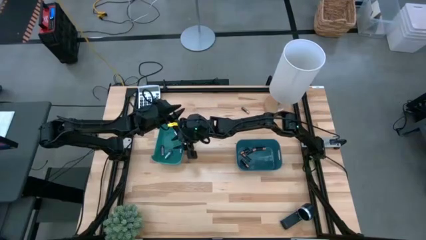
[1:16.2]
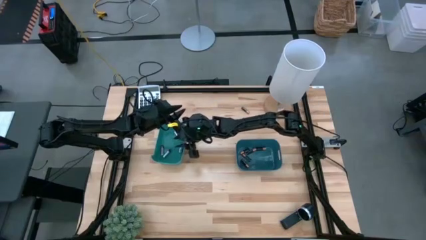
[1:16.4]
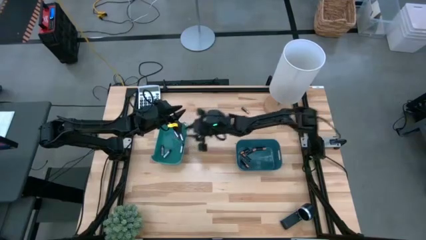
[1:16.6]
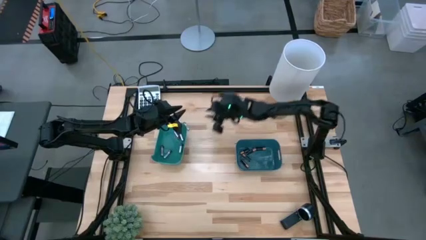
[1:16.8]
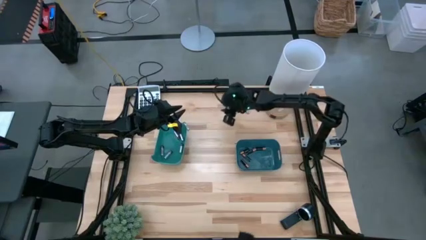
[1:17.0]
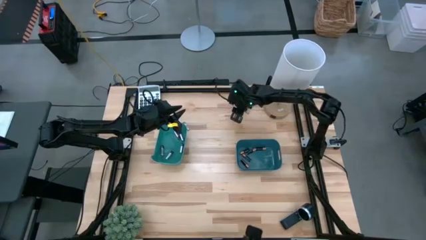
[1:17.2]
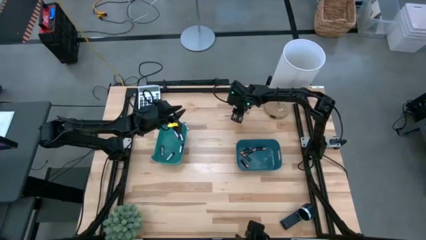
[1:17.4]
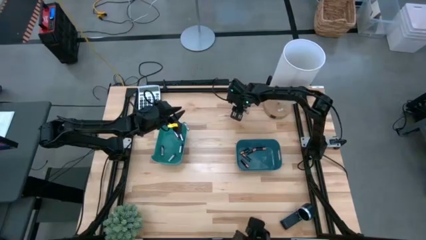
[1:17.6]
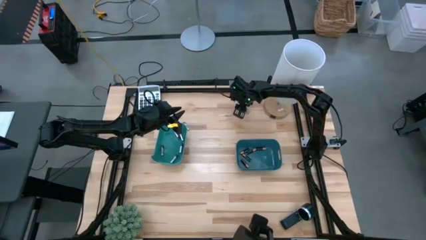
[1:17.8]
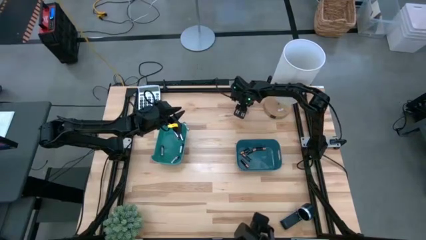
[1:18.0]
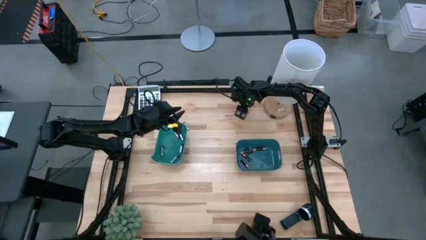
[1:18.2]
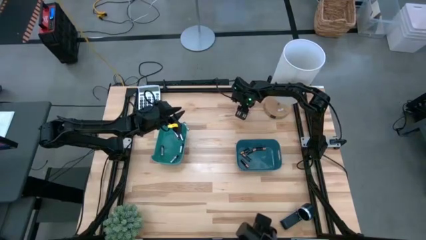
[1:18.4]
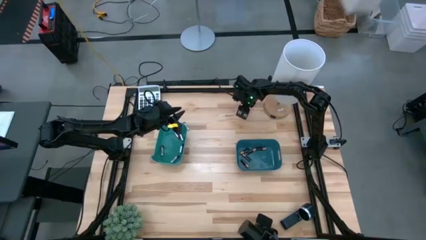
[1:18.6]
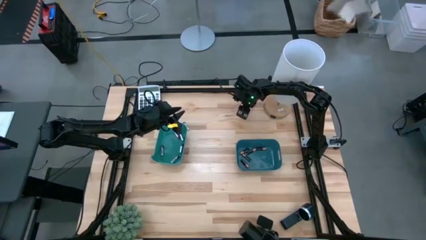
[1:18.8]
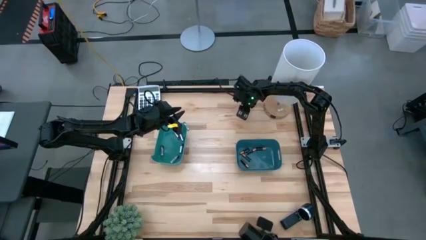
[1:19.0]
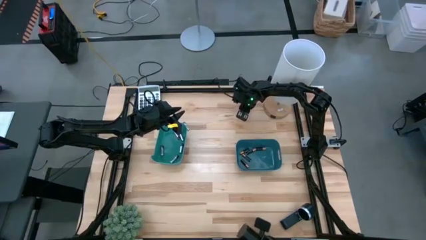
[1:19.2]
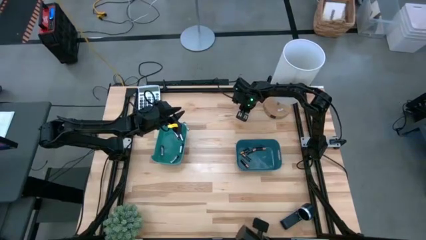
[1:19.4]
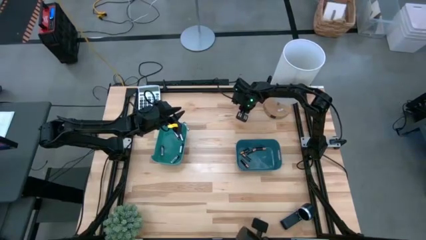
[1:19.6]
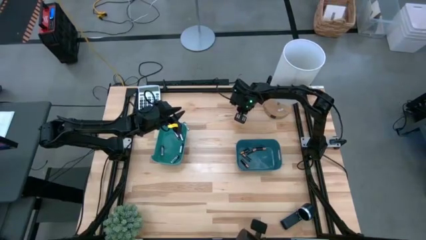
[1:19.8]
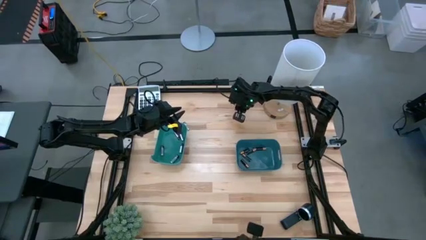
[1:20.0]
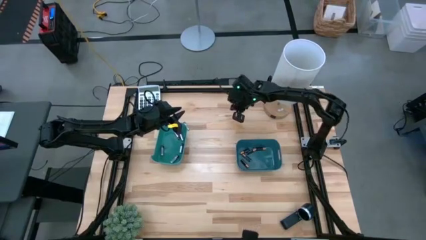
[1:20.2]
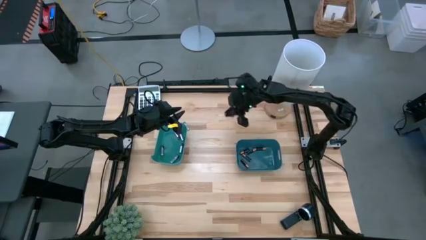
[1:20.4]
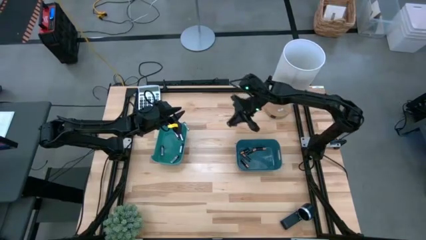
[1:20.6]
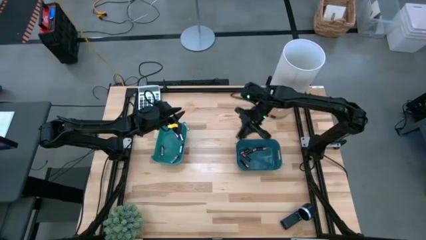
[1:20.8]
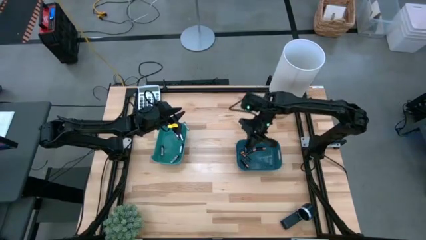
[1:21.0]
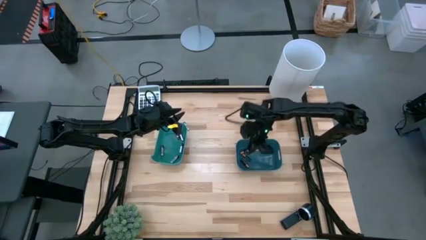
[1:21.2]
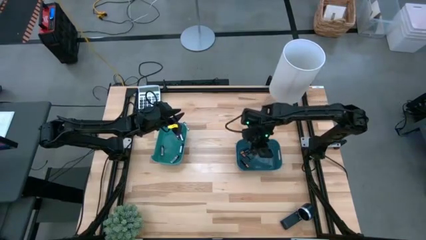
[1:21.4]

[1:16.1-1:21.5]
Task: Sort batteries
Put the black battery into the dark blue bin

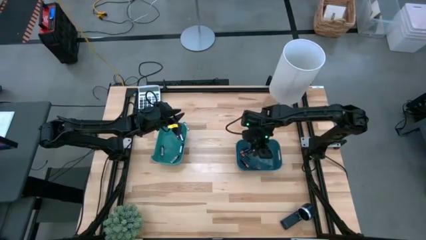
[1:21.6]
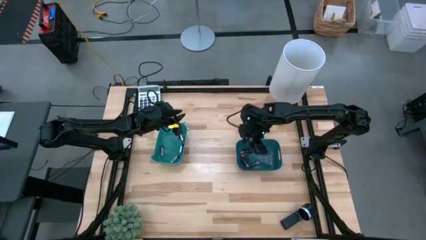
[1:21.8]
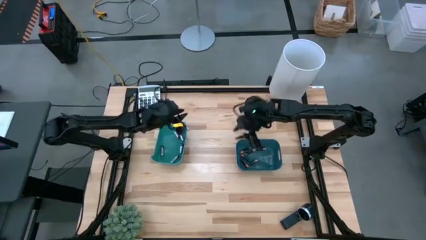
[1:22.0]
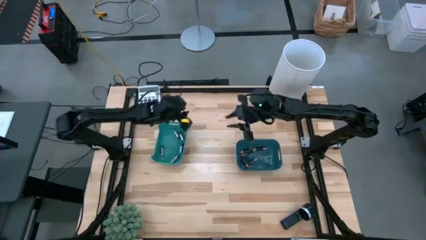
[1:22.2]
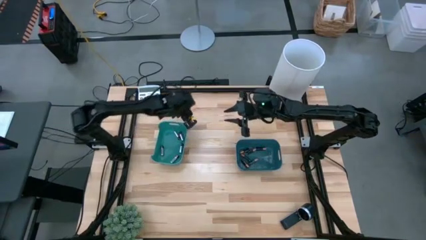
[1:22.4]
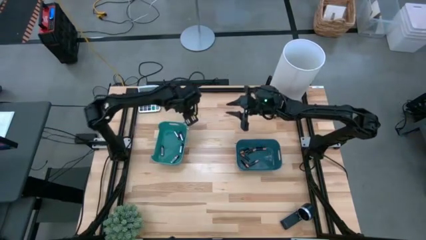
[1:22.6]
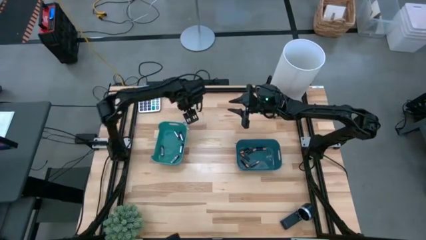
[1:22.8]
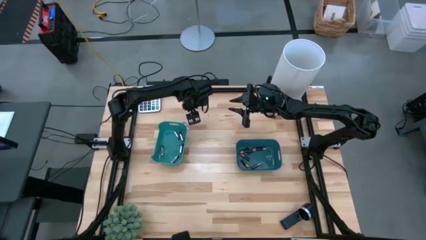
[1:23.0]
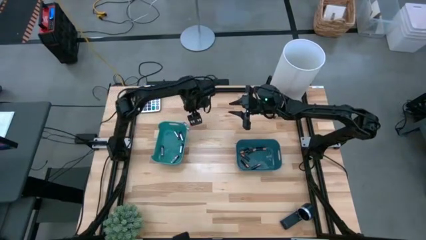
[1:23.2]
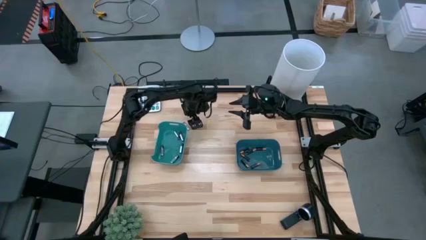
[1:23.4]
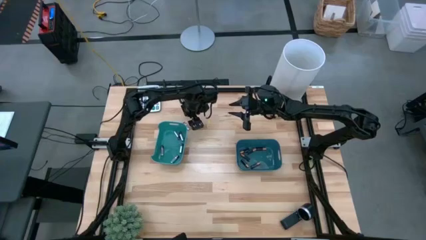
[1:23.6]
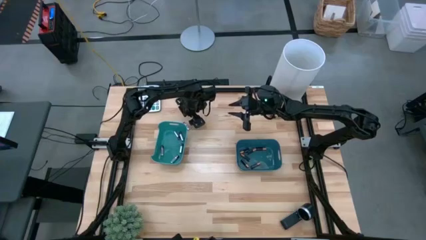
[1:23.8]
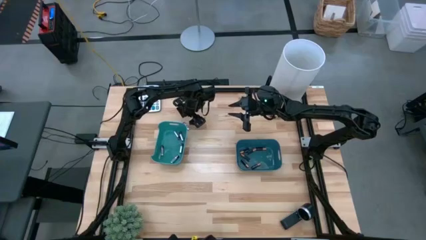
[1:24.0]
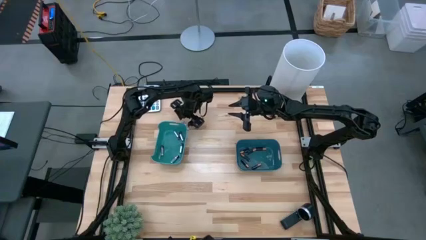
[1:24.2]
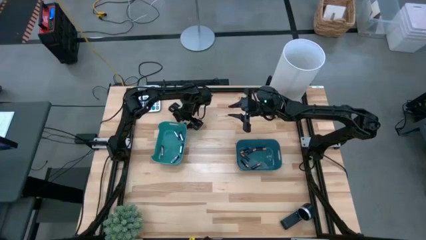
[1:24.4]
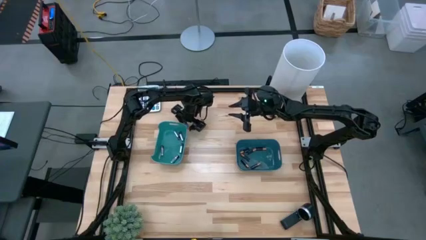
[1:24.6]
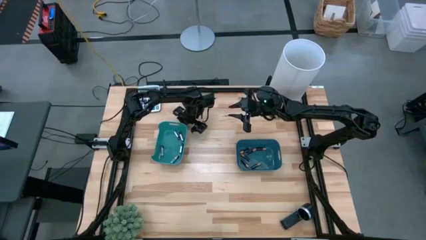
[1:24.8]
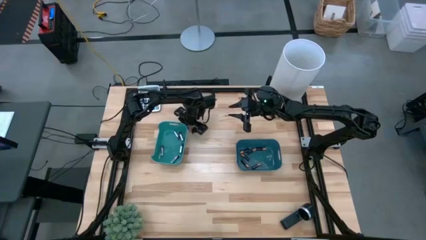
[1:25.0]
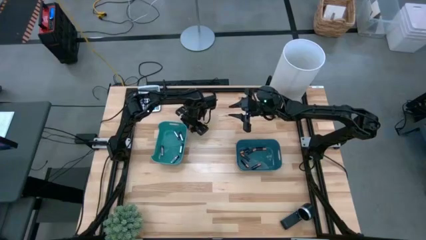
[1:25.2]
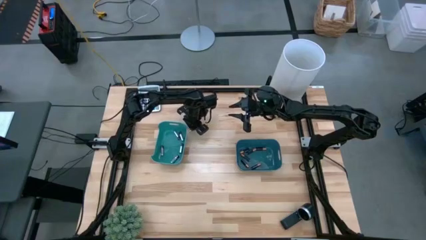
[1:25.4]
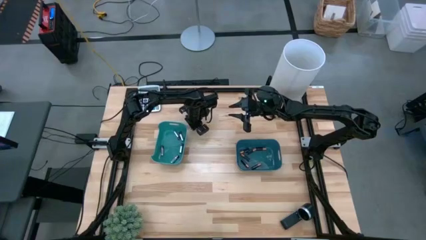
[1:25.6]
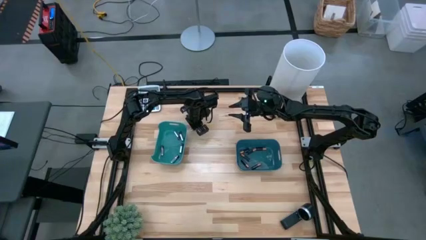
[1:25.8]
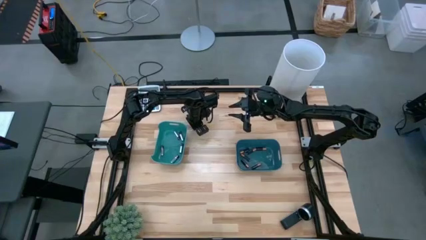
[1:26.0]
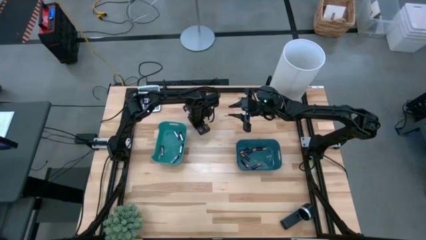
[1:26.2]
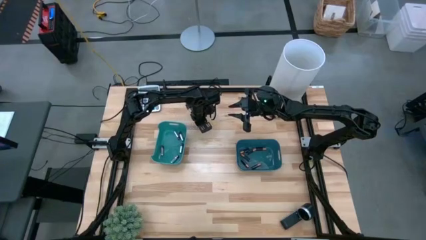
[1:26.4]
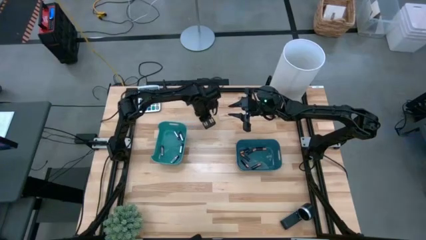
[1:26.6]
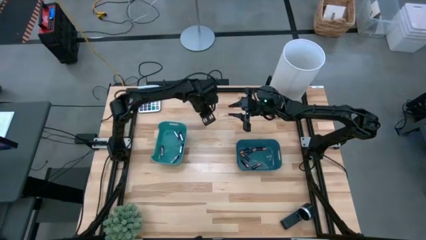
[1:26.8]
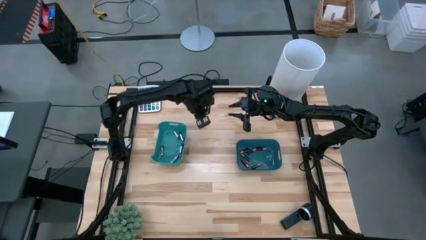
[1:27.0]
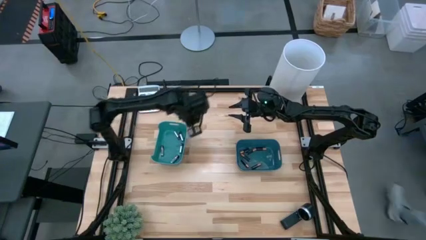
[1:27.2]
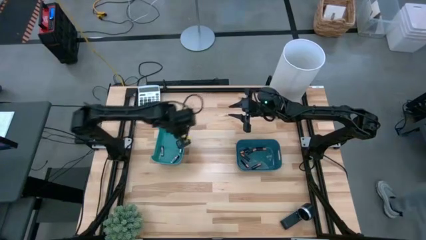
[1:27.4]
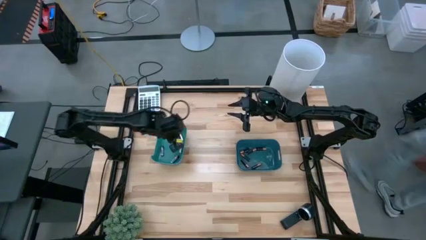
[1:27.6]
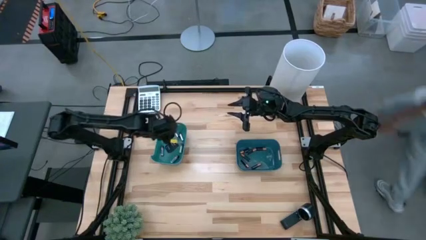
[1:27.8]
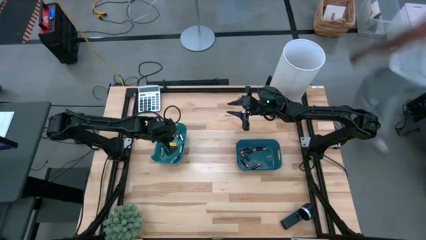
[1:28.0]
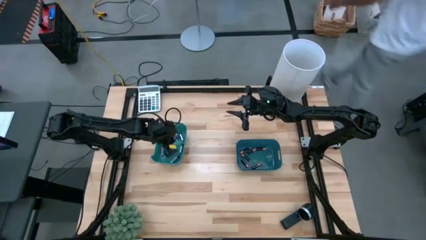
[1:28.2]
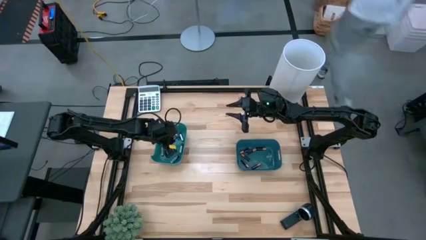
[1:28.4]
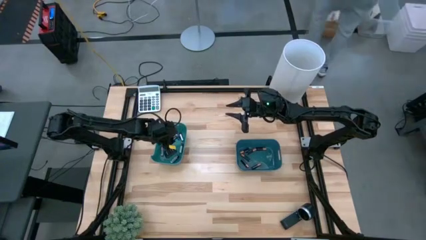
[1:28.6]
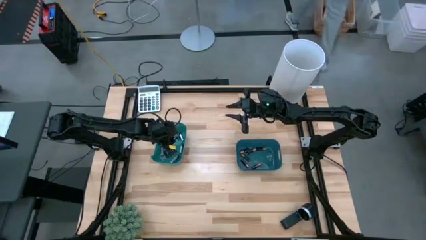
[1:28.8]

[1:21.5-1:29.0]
Put the silver battery into the green bin

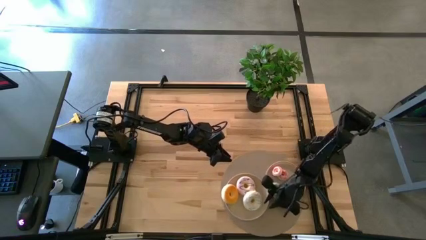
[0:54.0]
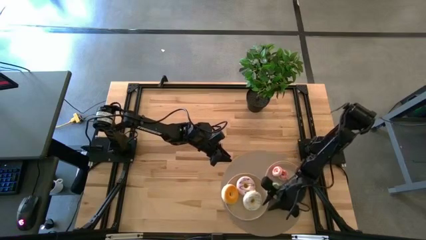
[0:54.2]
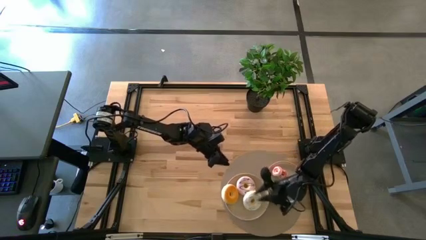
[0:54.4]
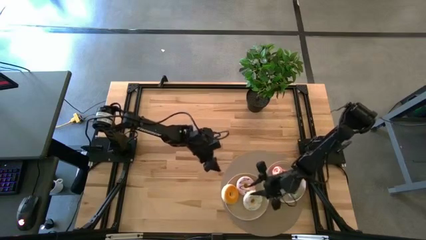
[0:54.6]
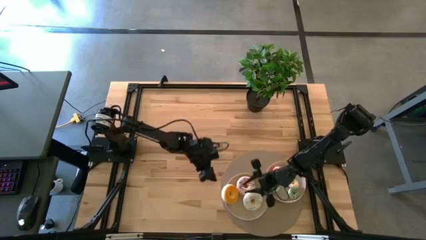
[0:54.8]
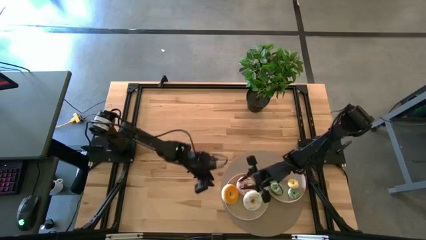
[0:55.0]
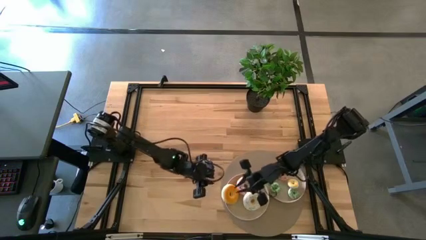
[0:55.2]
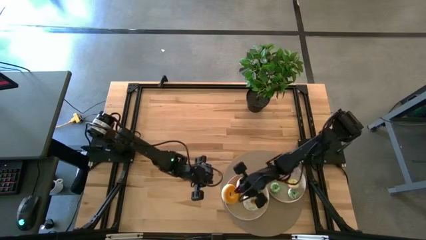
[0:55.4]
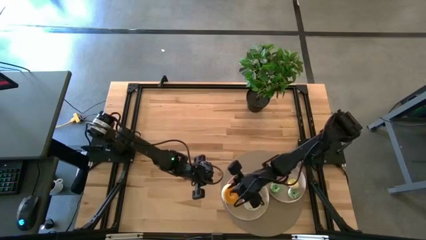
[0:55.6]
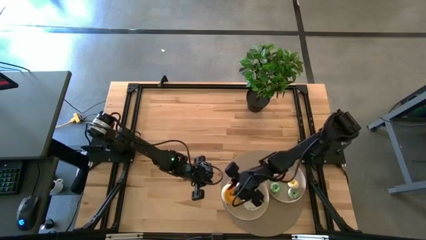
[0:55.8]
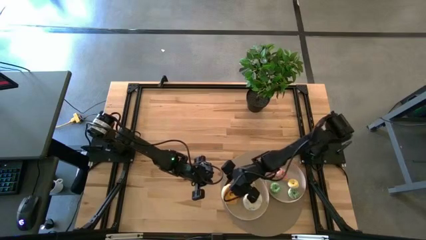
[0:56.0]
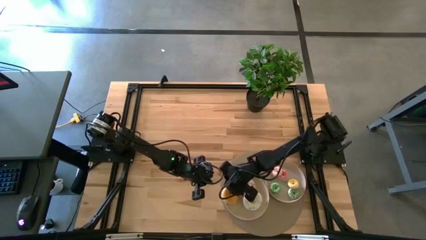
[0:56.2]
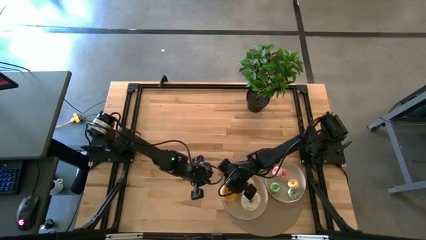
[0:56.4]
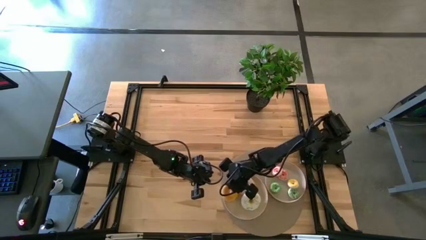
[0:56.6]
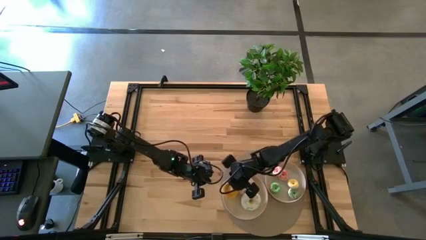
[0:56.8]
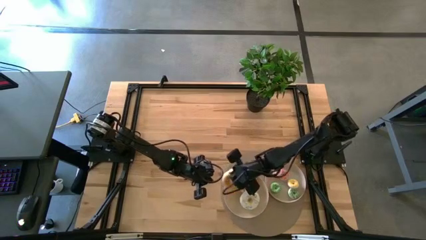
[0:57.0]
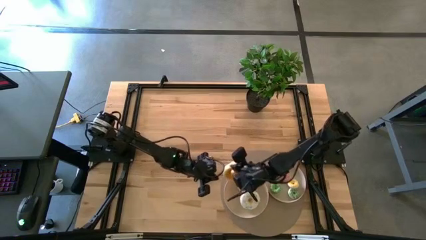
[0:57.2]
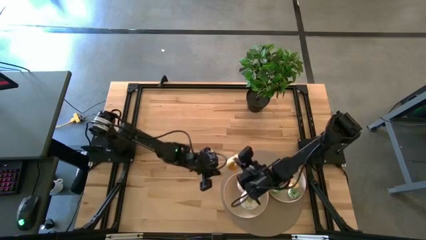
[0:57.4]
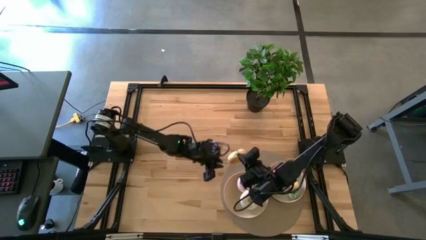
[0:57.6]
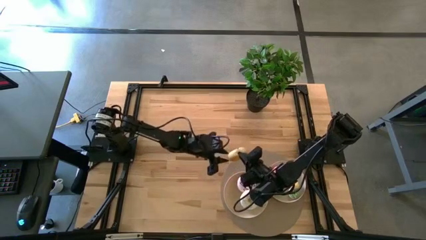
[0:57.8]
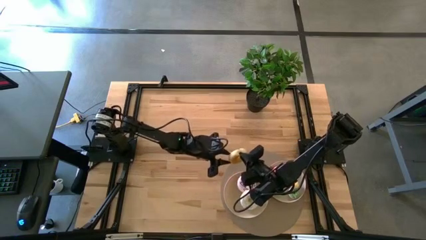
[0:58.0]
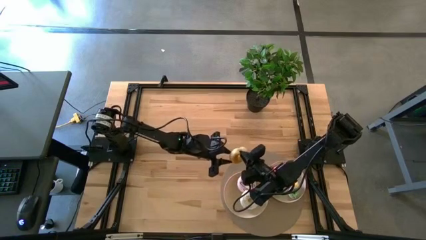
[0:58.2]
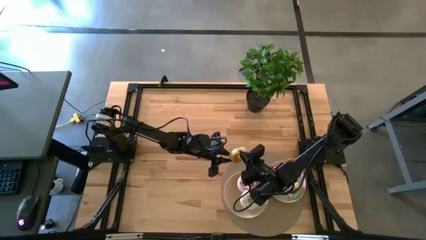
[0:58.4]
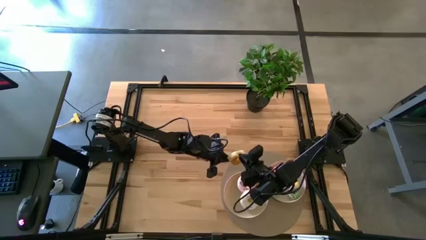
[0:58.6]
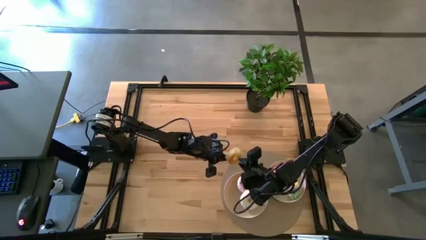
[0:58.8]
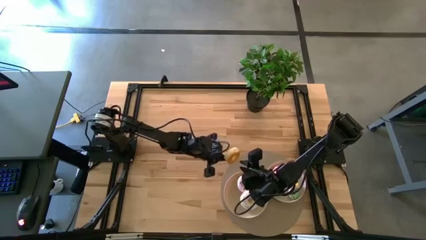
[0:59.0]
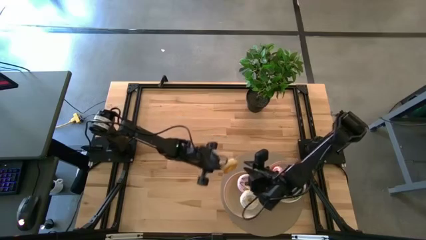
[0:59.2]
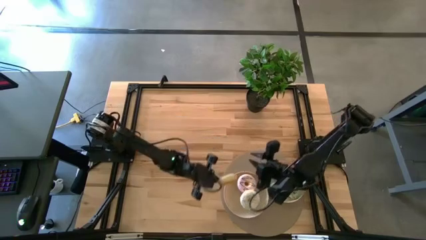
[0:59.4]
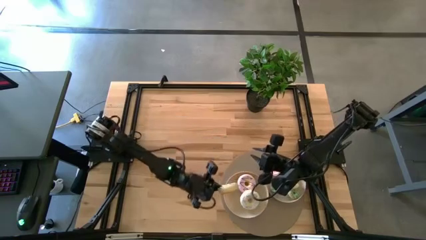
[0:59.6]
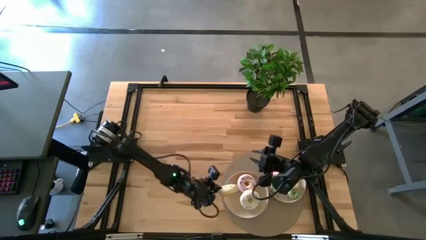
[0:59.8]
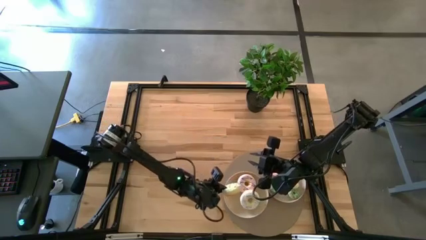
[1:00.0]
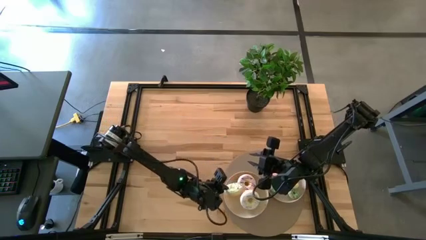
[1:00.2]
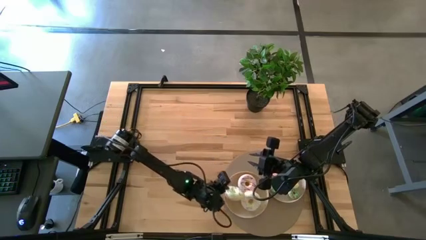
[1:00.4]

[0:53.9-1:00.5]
Task: Pick & Place donuts
Adjust the big blue donut
